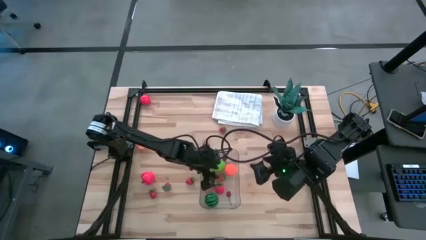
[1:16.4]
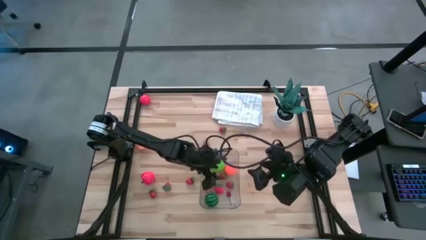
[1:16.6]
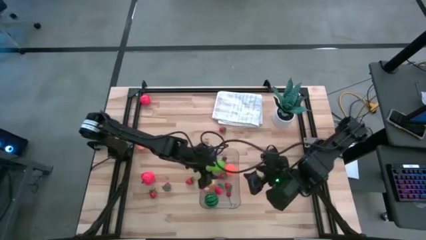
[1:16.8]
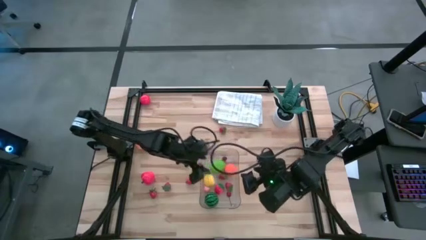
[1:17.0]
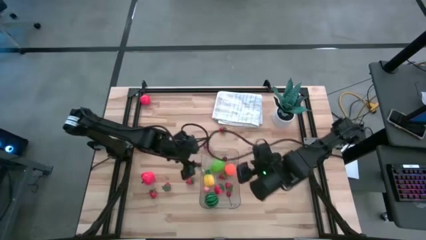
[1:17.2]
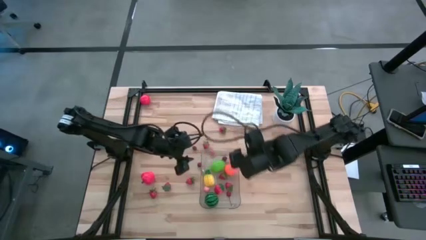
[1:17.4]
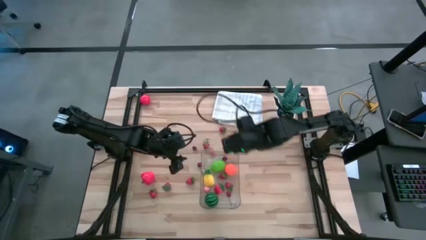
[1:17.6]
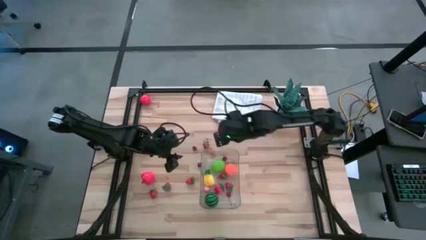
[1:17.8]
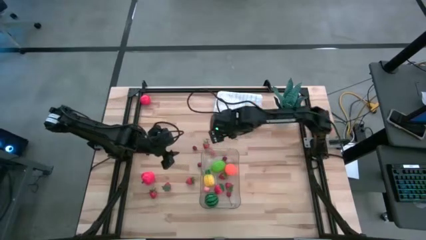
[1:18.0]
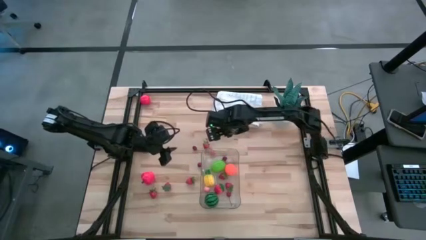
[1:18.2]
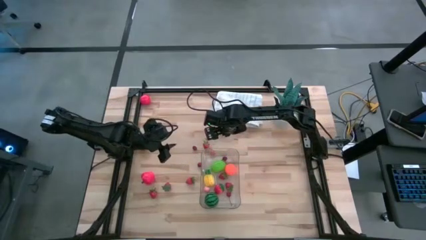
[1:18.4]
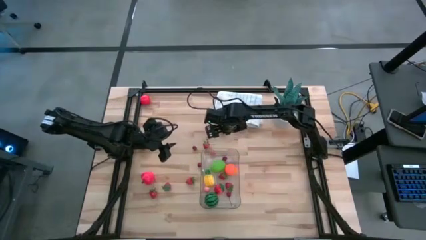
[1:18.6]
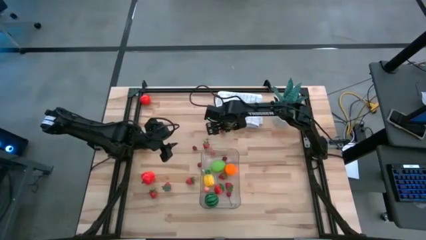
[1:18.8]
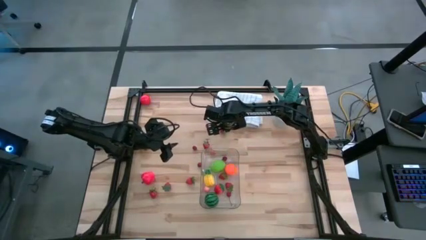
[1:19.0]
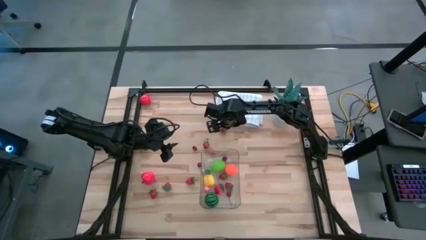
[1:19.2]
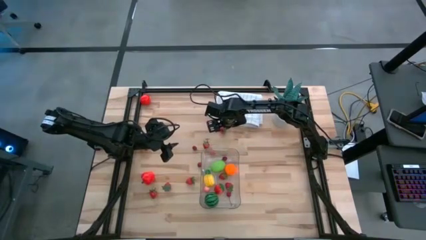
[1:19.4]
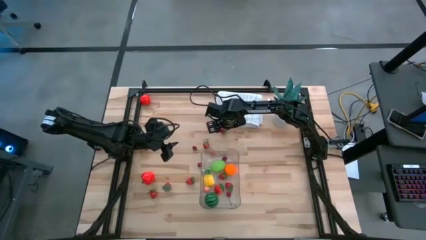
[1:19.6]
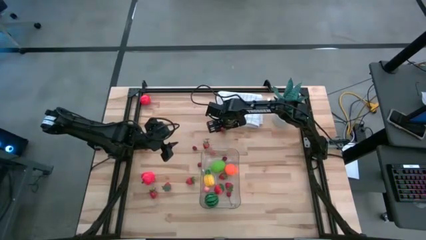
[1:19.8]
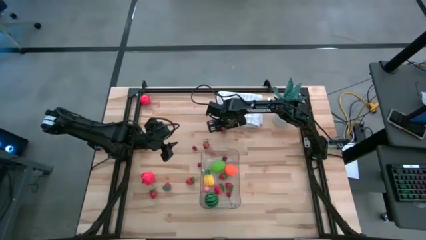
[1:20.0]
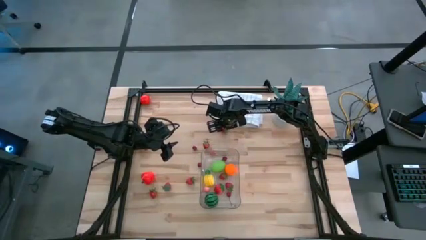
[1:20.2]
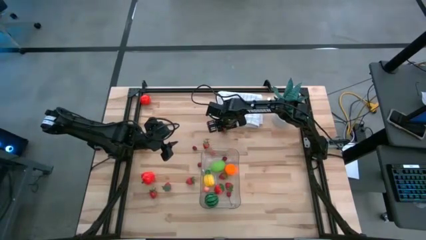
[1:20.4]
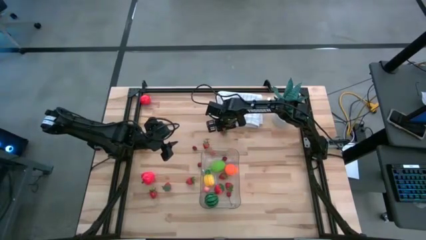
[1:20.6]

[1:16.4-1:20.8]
Task: Pick and placing Produce into tupperware
Put the red strawberry into the transparent bin

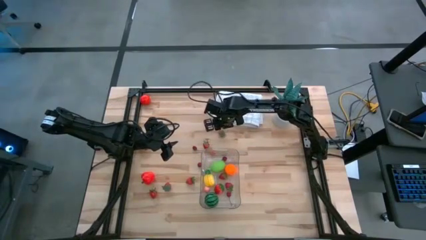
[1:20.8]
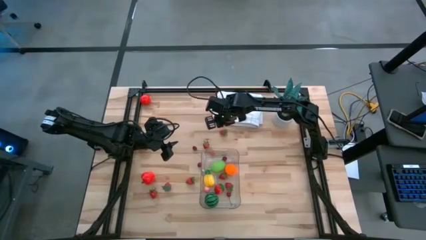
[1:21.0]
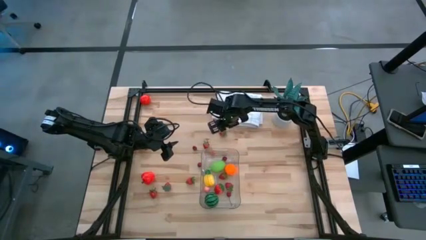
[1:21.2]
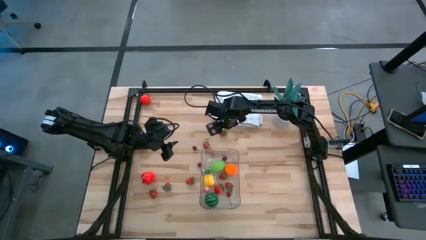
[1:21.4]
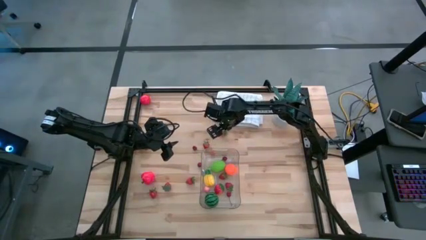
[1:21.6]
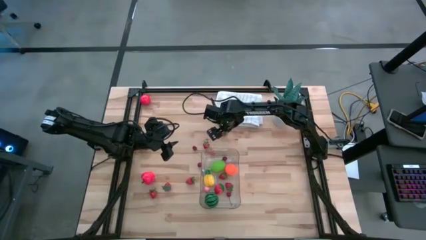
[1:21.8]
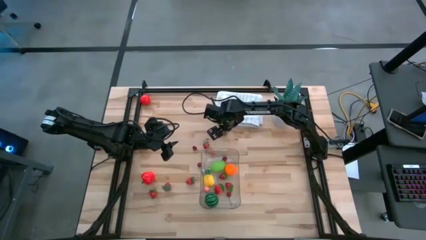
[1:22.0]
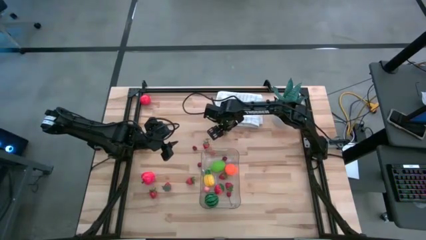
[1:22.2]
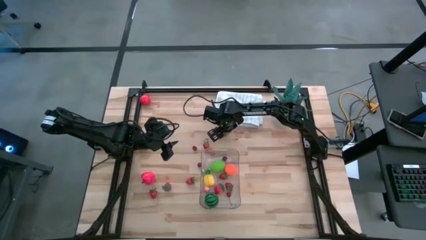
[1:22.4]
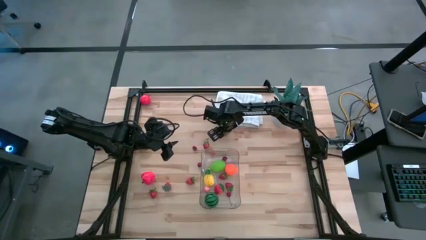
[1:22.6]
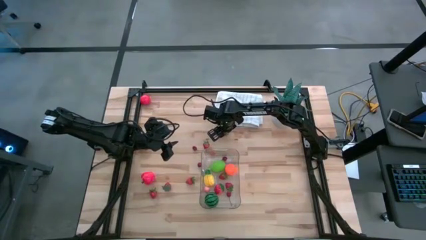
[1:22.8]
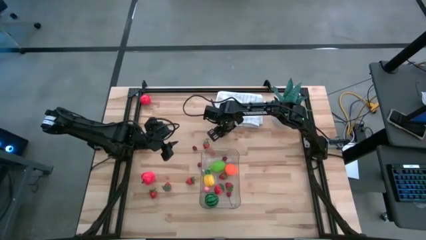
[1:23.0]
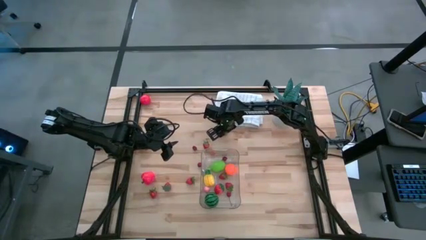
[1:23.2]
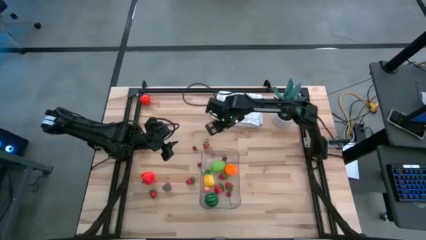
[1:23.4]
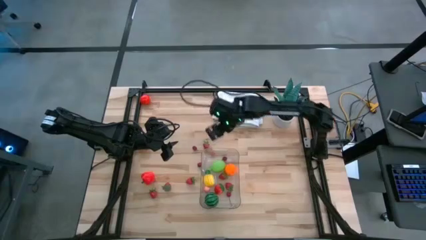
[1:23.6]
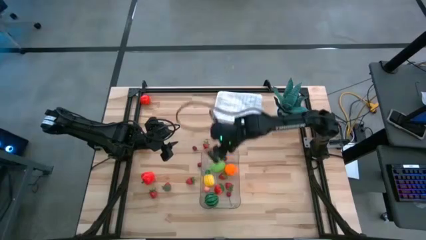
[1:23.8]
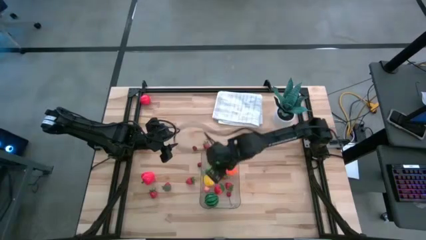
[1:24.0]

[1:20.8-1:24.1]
Put the red strawberry into the transparent bin

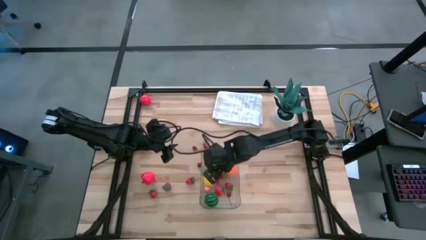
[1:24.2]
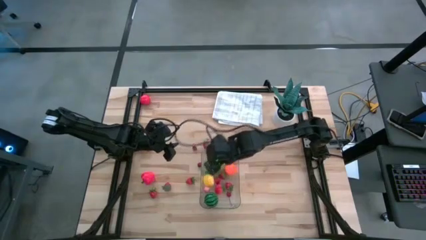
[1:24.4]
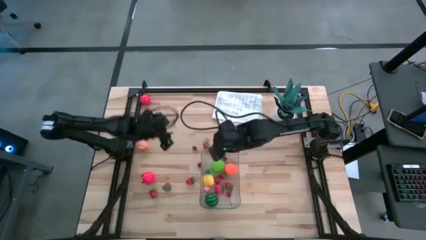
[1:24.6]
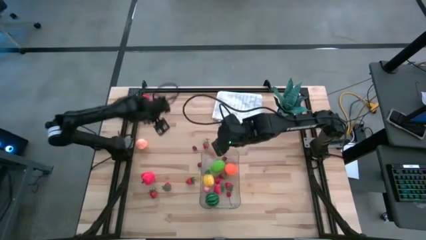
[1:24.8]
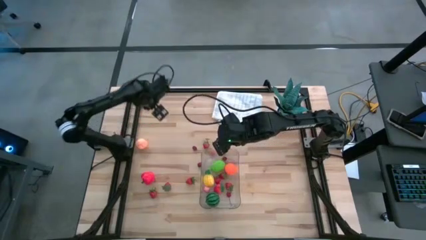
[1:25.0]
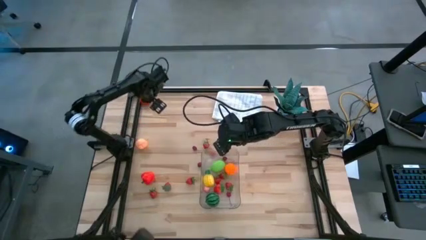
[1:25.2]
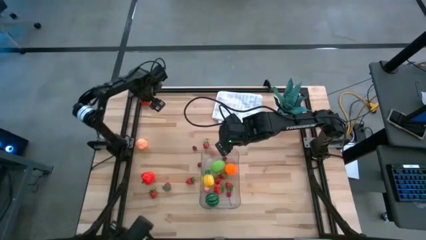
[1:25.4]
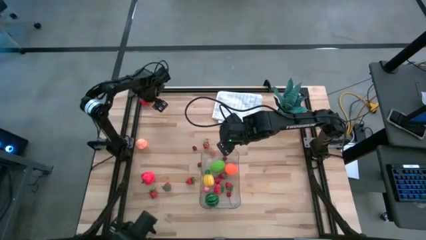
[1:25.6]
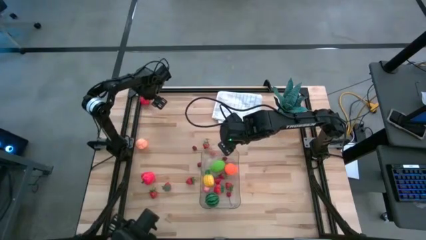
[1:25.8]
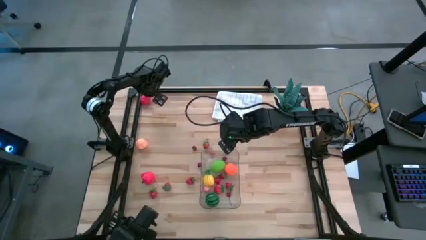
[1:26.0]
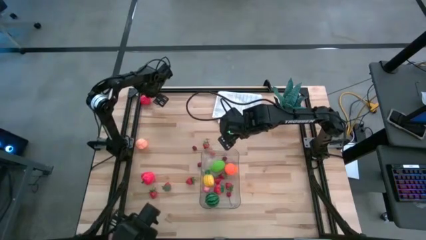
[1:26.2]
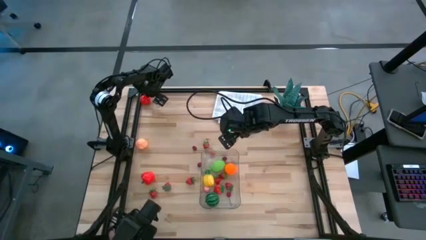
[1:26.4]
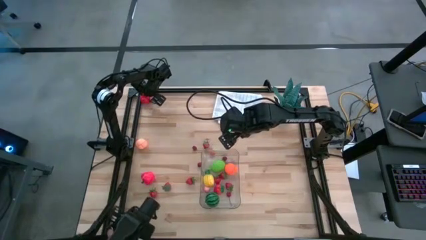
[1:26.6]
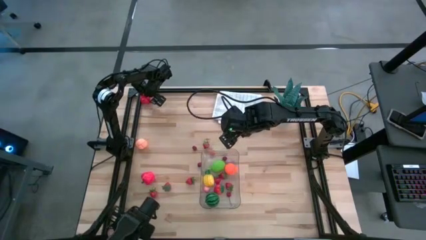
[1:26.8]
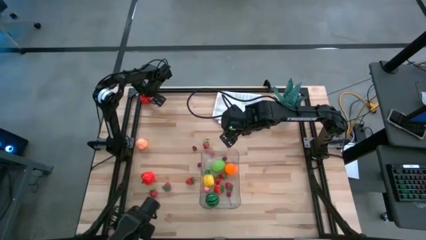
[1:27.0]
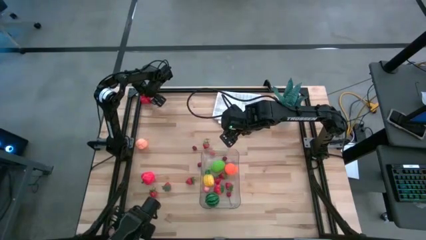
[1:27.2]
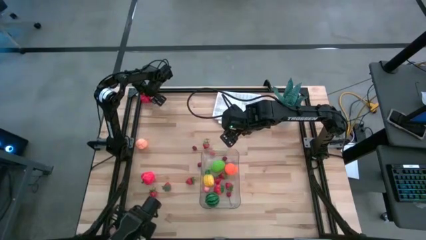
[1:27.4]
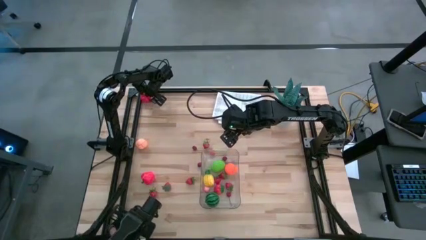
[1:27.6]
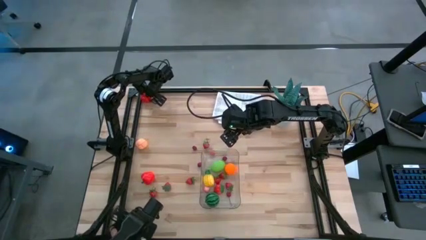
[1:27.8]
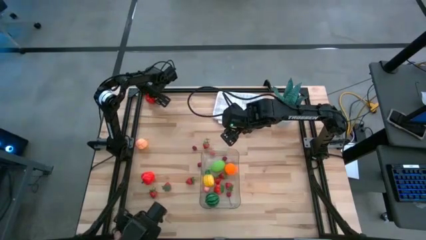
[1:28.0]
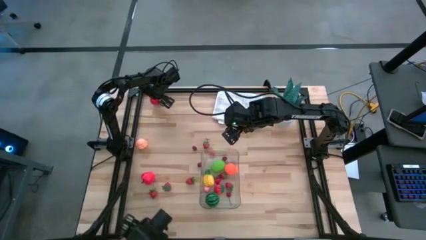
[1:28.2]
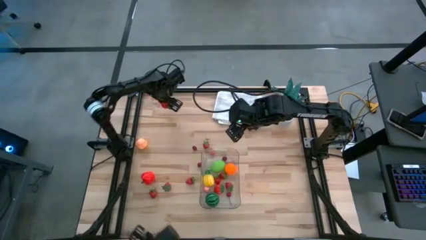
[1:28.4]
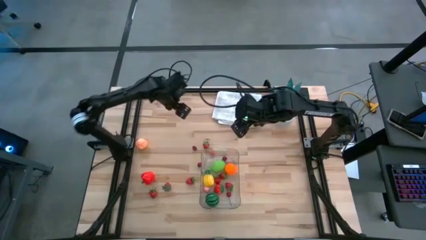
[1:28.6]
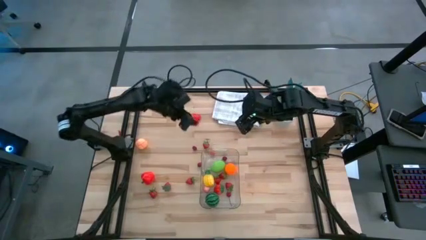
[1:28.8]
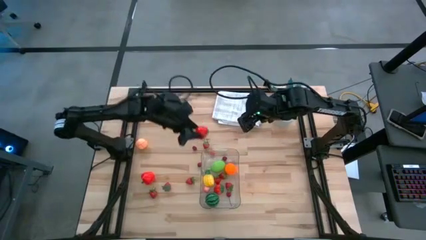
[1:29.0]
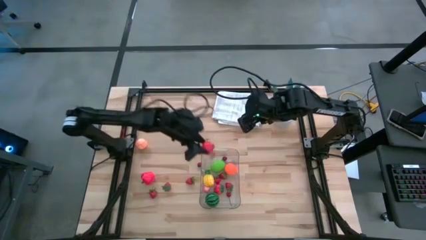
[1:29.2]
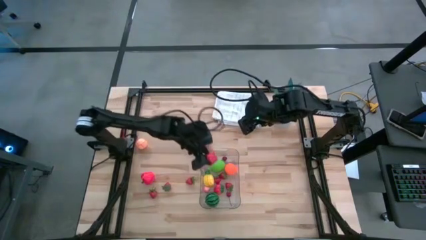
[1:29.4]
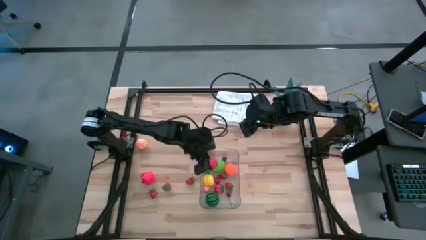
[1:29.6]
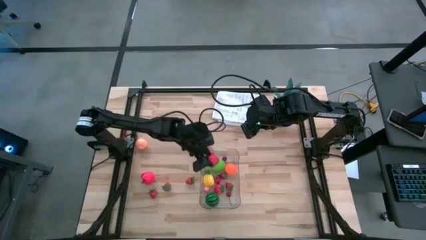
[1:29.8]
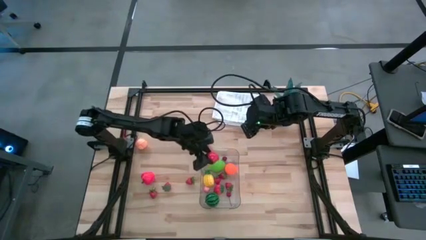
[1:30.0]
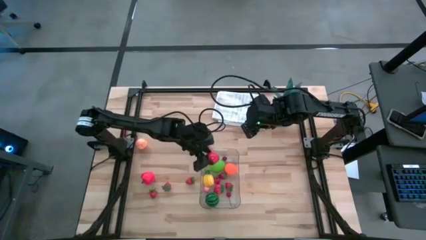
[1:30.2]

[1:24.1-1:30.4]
Put the orange tomato into the transparent bin

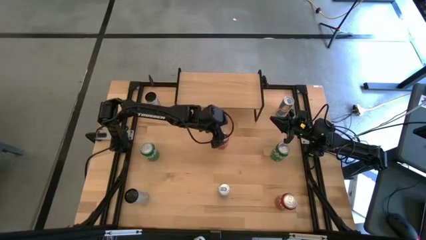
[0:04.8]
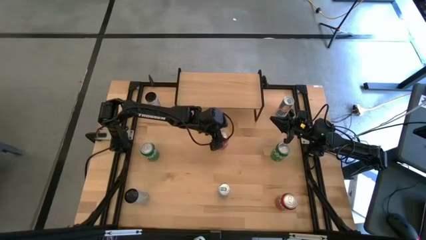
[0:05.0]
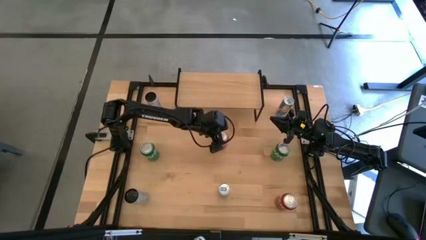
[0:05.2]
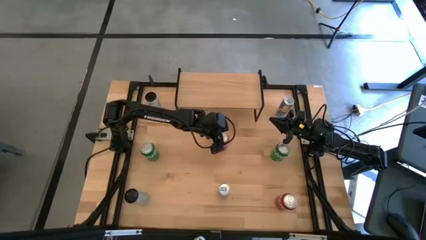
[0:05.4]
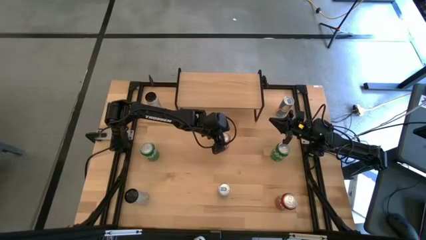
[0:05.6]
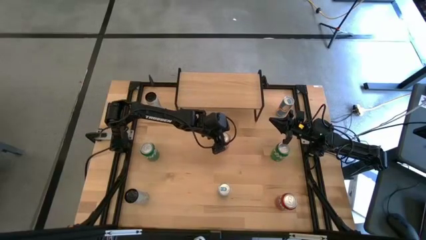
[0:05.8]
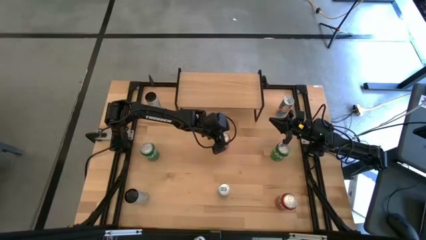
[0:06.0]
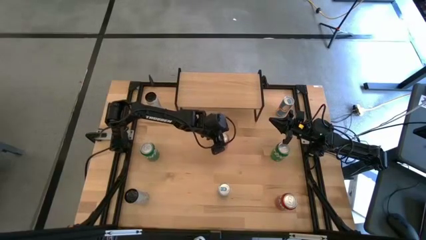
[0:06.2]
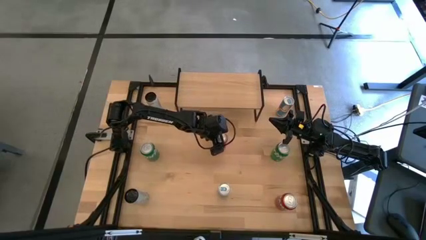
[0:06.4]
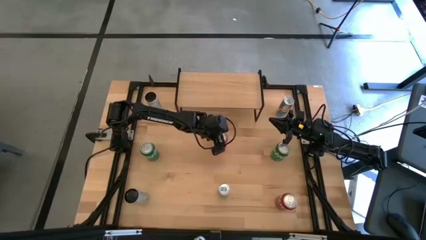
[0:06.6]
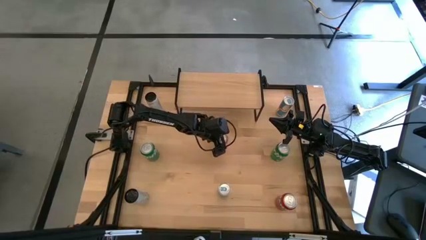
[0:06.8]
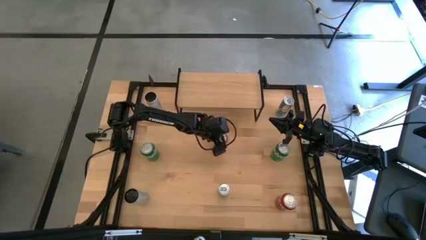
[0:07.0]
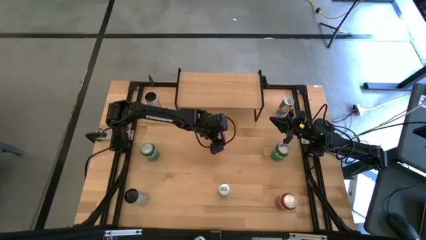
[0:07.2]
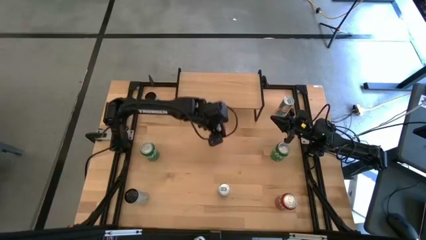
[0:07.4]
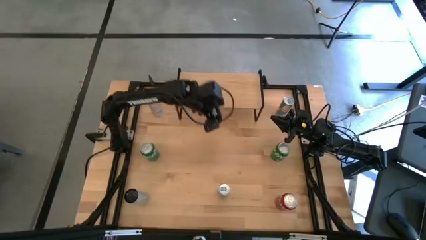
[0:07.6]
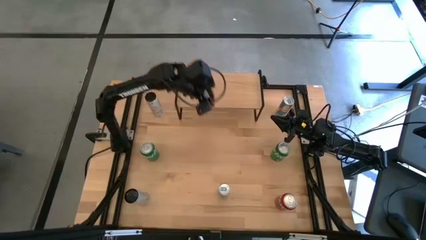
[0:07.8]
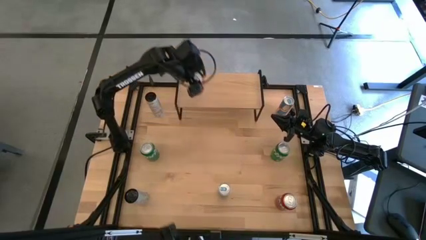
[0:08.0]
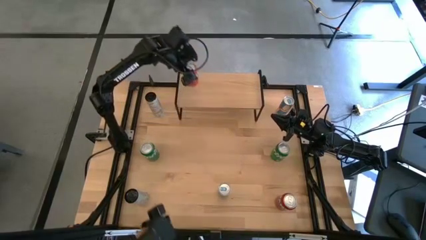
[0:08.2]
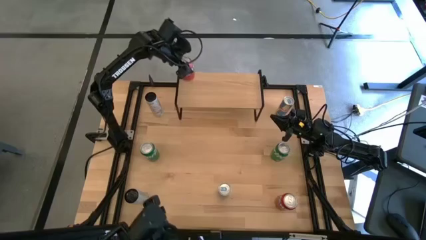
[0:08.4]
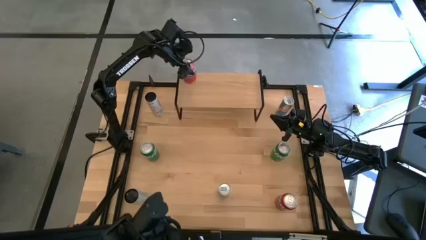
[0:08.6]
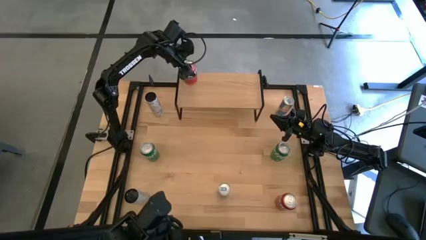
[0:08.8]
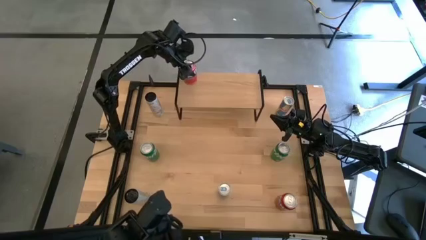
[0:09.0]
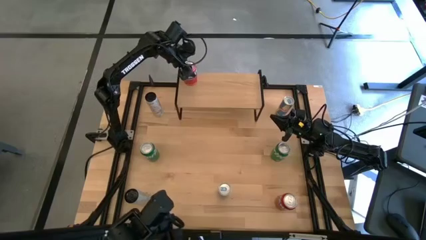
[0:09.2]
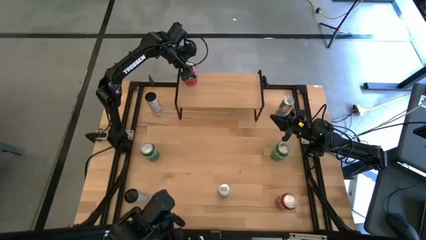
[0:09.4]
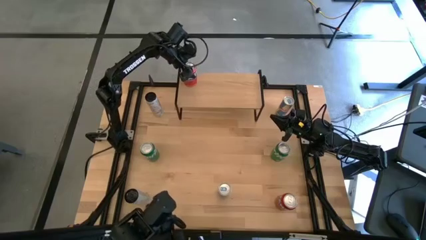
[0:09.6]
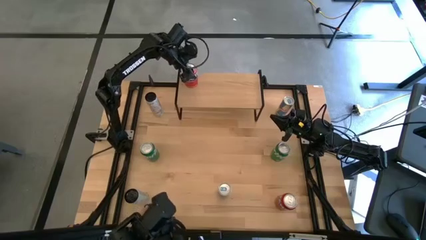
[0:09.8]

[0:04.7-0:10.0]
Task: Place canned beverage on shelf
Put the top red soda can on the shelf
